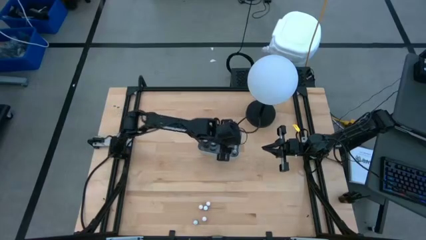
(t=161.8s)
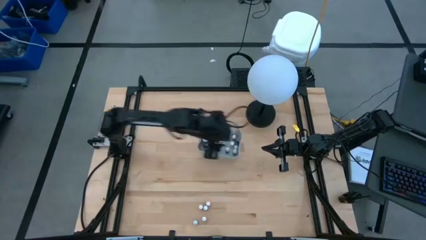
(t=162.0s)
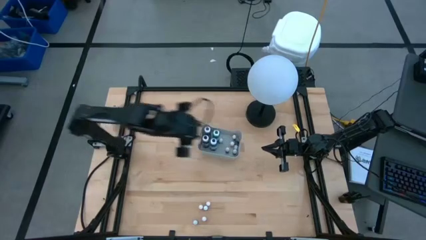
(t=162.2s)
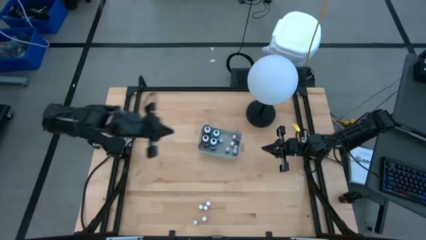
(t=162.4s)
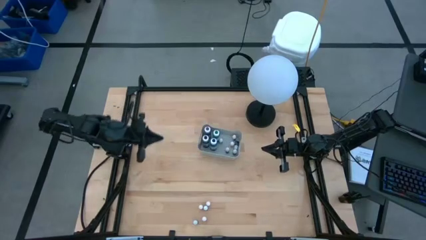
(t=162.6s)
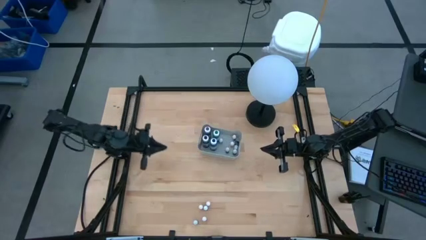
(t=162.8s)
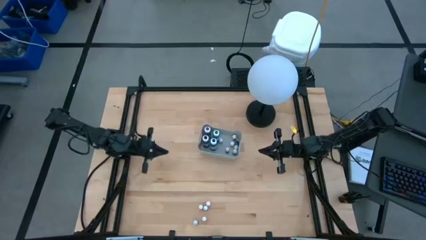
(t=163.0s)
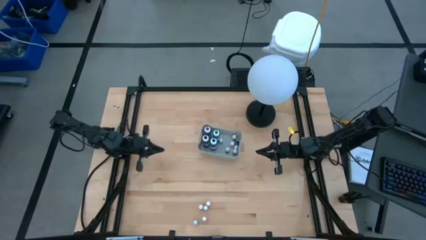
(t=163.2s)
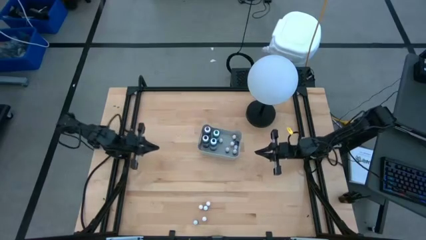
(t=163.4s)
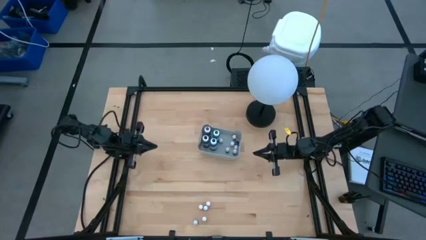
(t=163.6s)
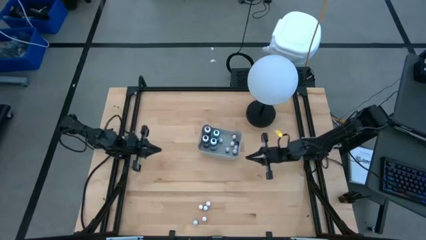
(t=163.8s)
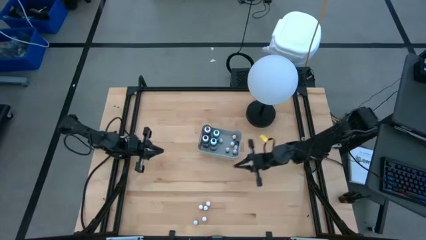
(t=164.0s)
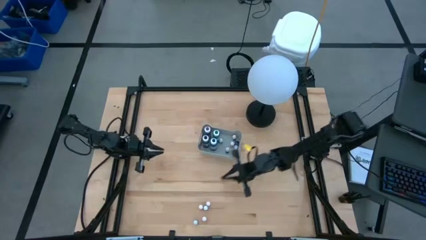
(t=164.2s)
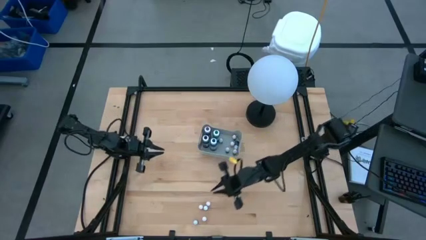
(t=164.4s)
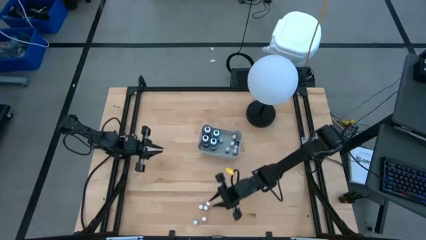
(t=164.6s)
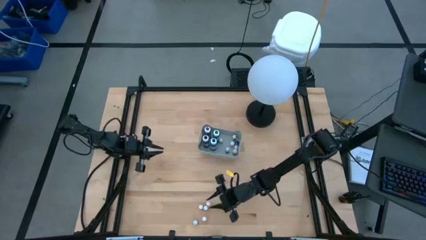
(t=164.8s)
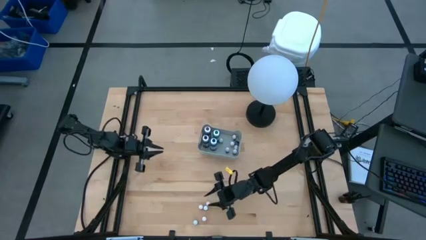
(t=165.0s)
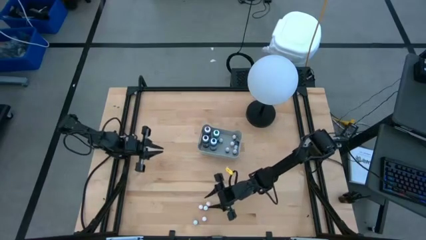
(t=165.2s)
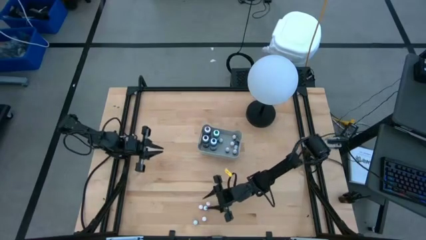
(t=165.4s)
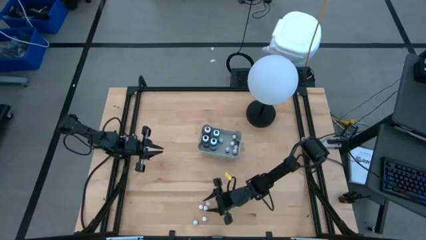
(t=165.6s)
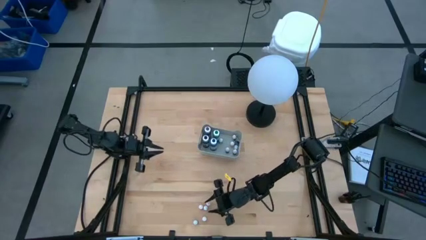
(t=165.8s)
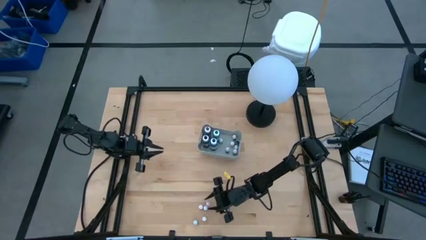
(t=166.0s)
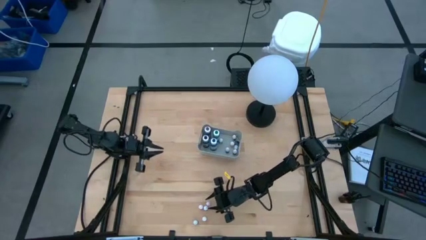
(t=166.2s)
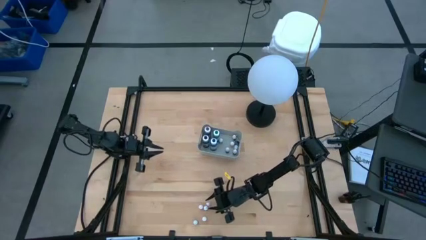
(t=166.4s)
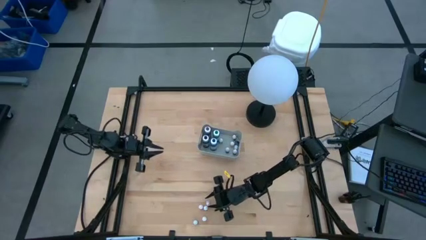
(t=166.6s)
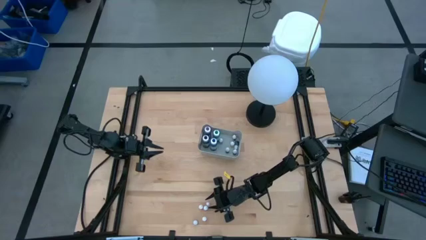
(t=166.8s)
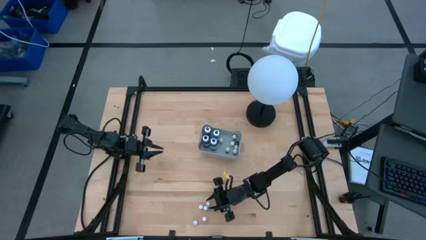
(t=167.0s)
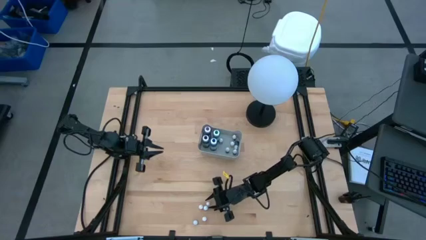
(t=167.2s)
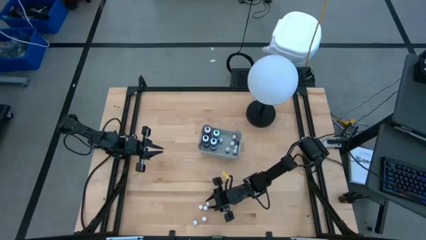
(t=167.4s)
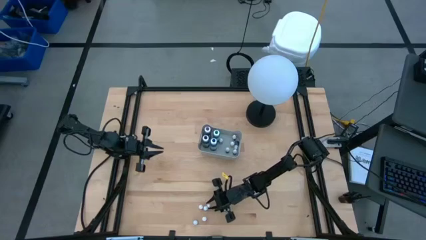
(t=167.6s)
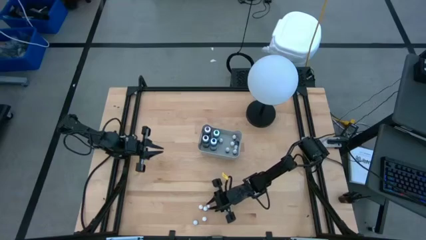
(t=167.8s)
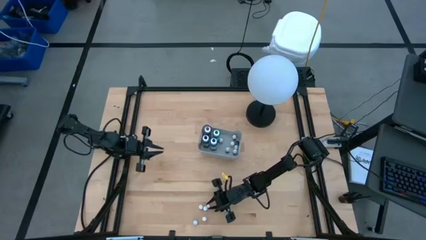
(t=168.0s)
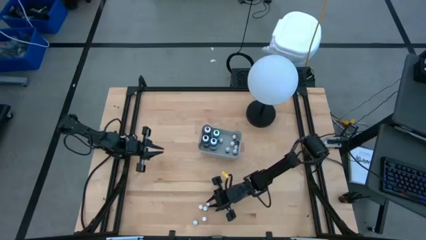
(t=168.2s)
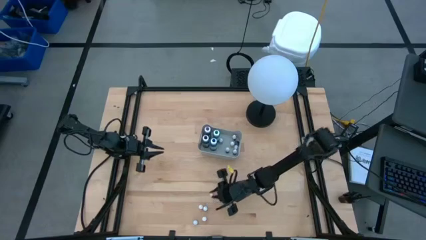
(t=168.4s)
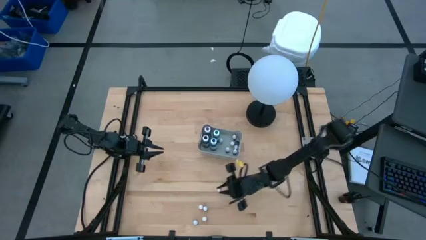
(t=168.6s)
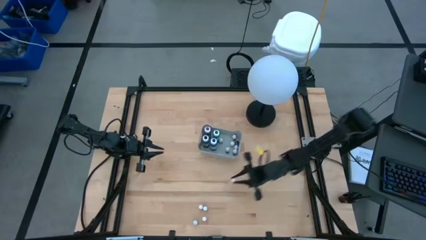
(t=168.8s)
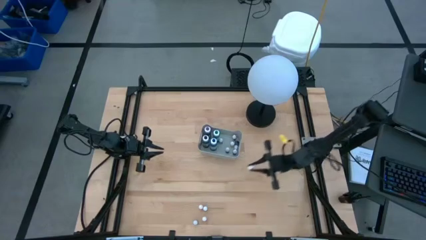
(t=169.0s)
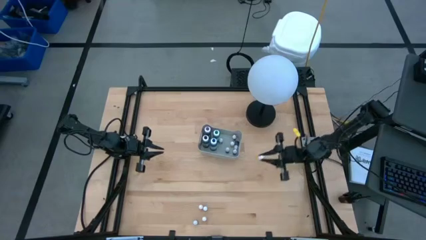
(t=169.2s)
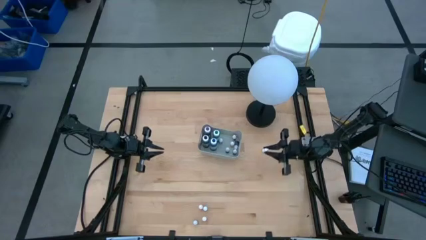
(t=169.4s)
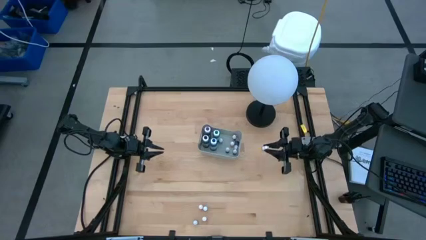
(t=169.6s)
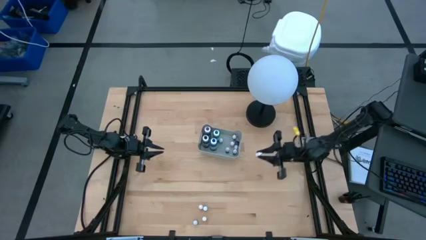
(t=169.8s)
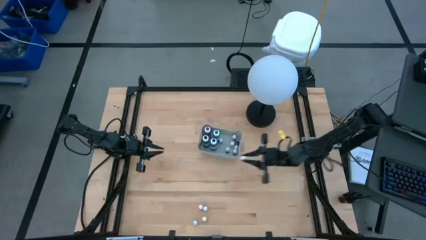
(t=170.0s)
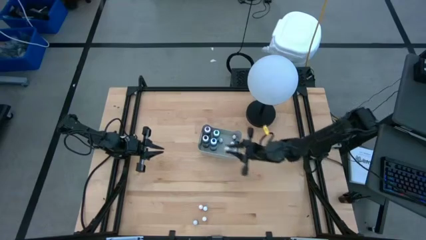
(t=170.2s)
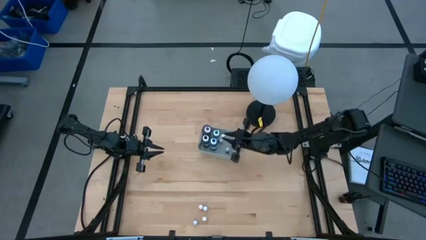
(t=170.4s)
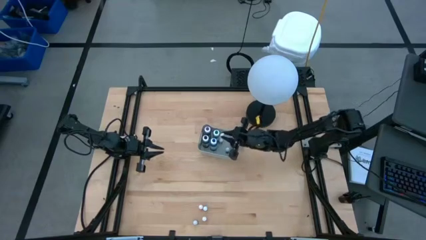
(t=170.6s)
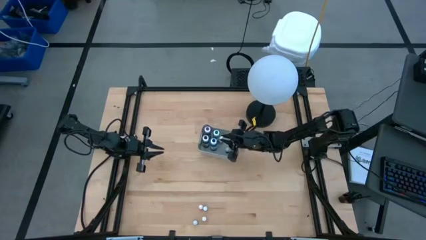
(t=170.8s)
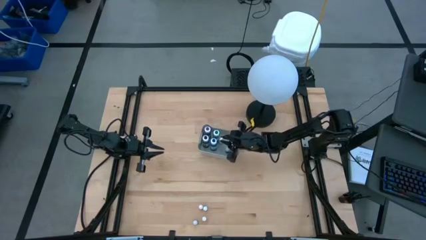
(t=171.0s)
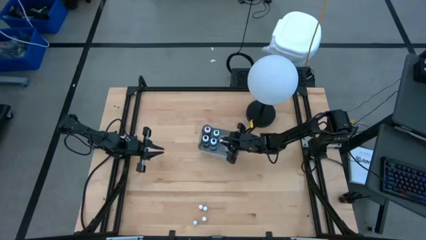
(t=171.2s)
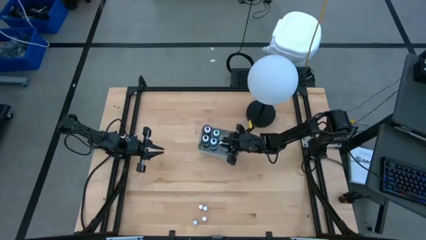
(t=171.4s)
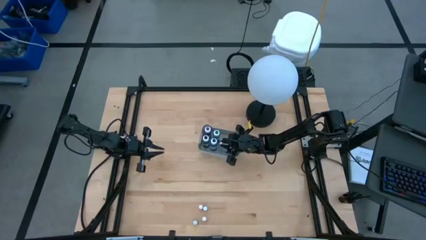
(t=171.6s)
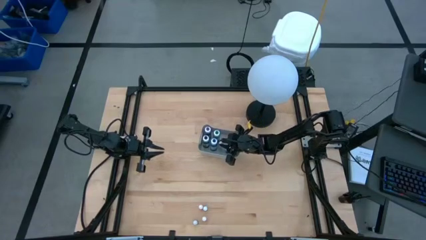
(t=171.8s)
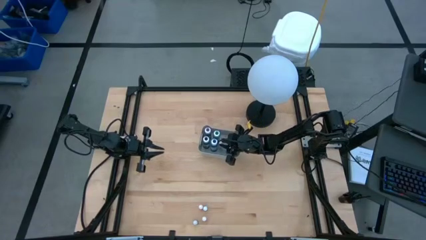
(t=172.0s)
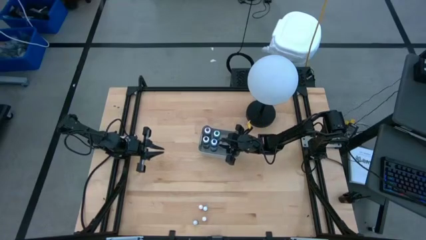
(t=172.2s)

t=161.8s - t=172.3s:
Task: Pick & Place food coloring
Put the small orange food coloring bottle into the gray bin

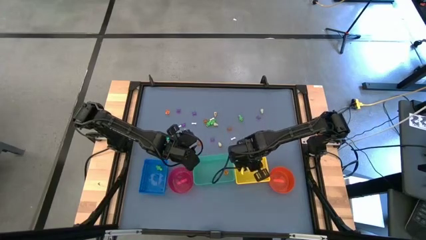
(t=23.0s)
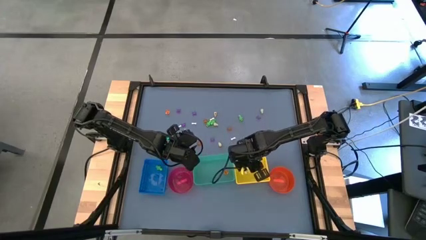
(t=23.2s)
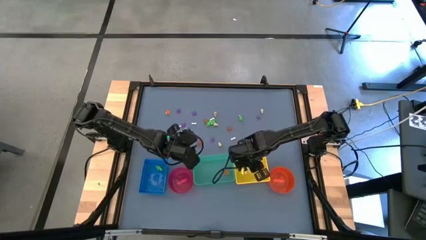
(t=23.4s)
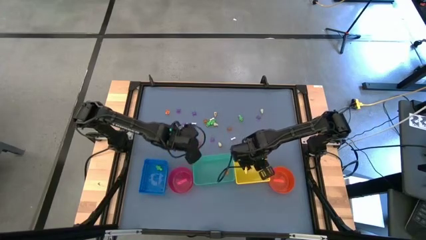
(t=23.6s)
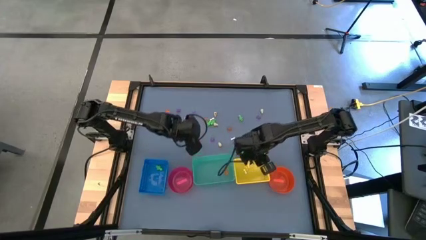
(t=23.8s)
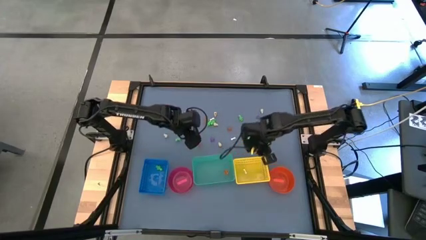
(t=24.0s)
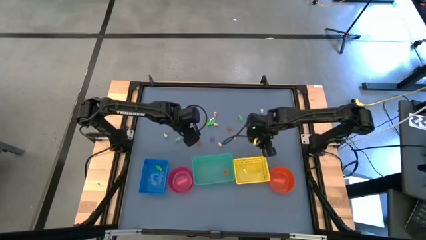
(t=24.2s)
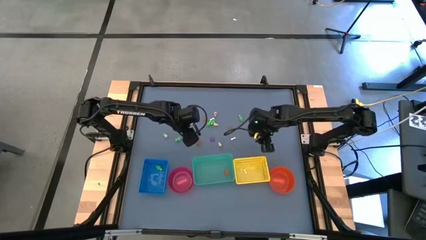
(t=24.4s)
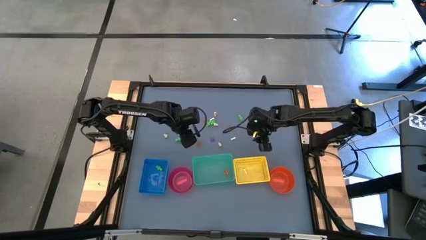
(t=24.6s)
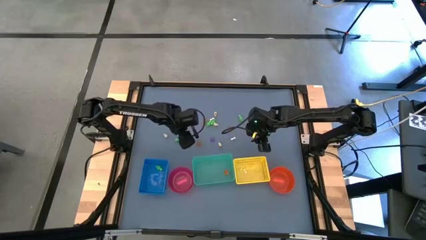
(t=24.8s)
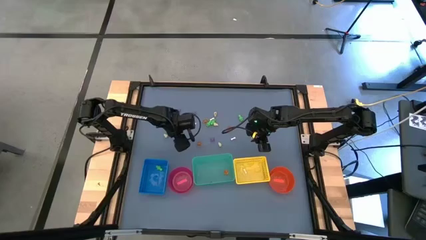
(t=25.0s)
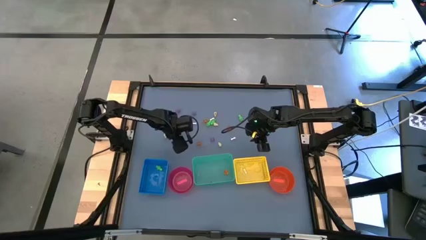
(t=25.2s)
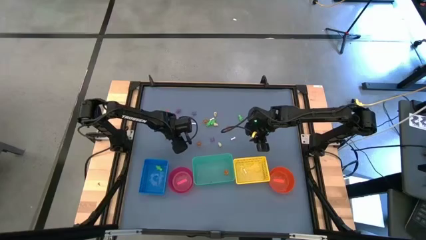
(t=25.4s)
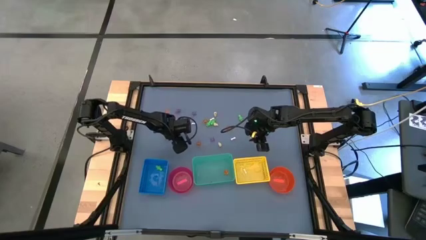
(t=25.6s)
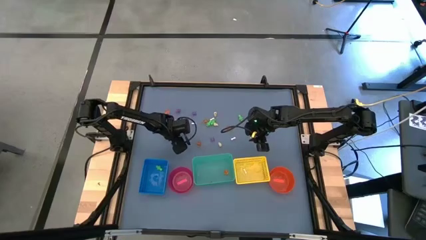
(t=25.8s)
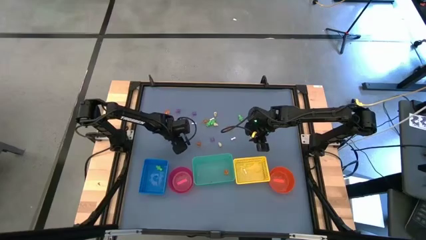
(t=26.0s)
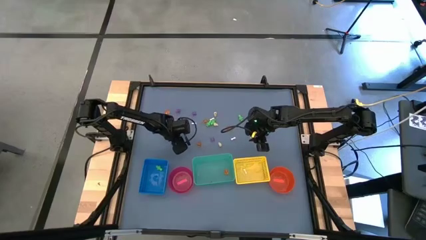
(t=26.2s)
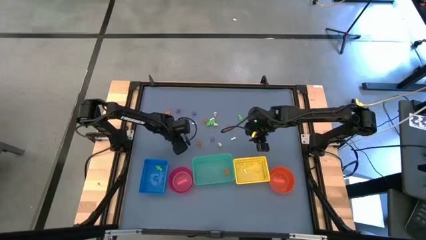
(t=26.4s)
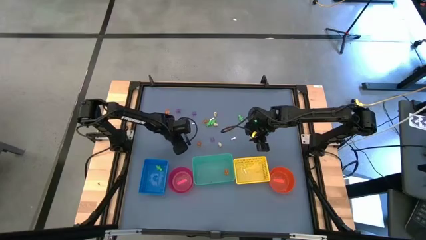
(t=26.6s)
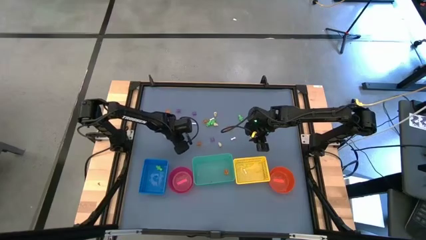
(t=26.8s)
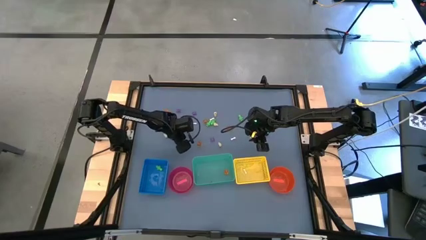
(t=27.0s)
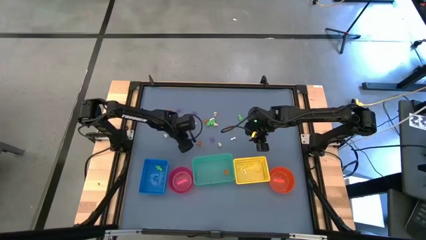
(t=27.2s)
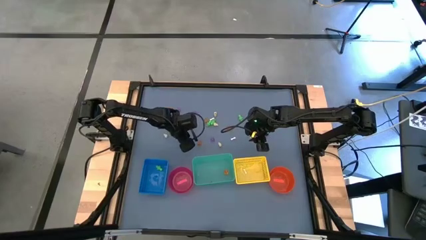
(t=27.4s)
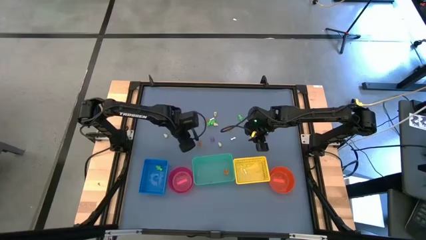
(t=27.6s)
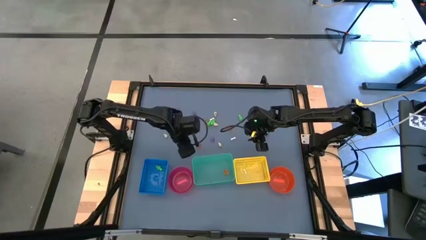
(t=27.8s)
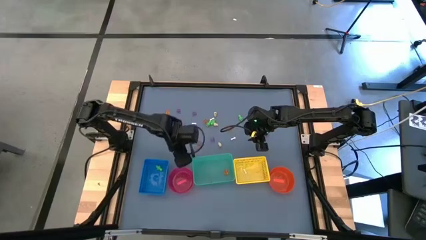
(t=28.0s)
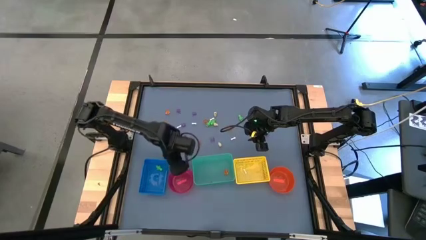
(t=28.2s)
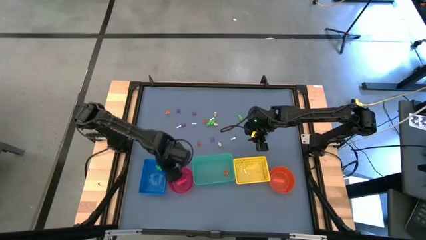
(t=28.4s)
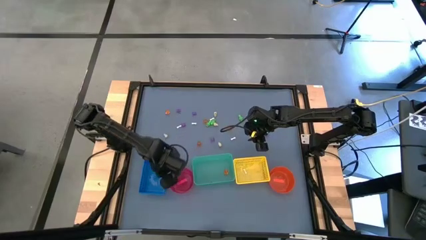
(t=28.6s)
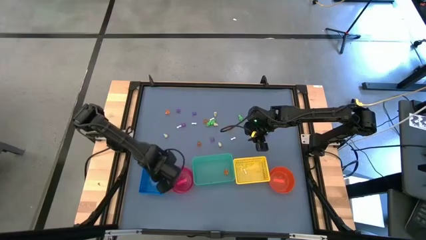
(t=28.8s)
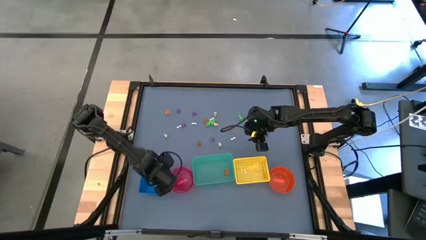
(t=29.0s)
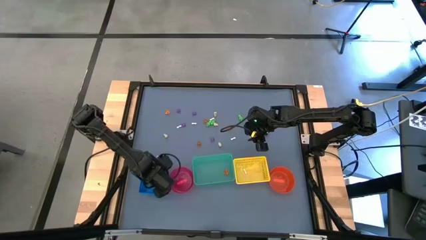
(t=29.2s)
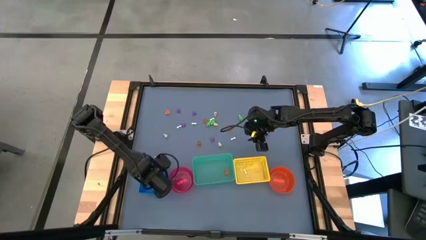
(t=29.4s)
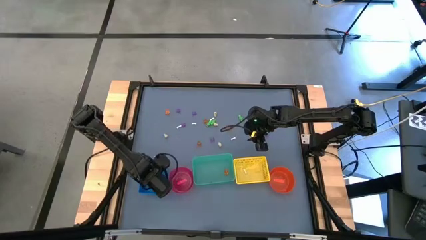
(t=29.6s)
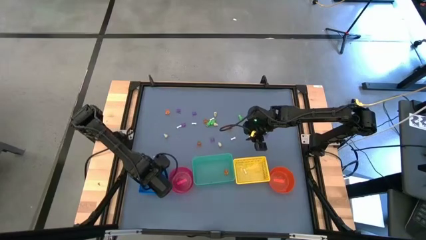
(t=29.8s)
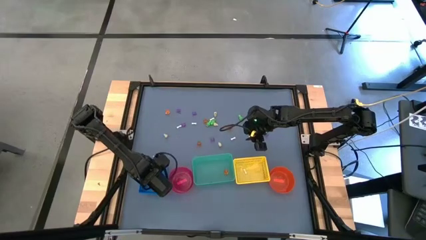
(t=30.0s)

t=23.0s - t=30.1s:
Task: Sort Halloween decoration
Put the green skeleton toy into the blue bin
